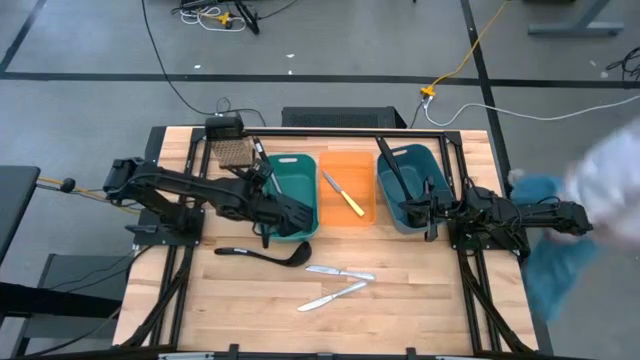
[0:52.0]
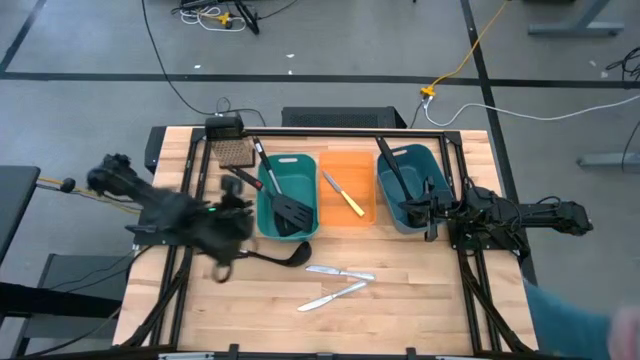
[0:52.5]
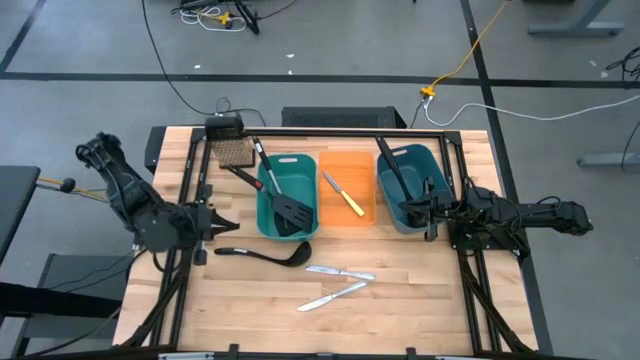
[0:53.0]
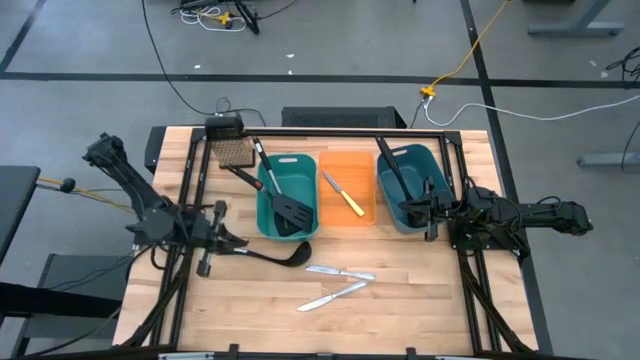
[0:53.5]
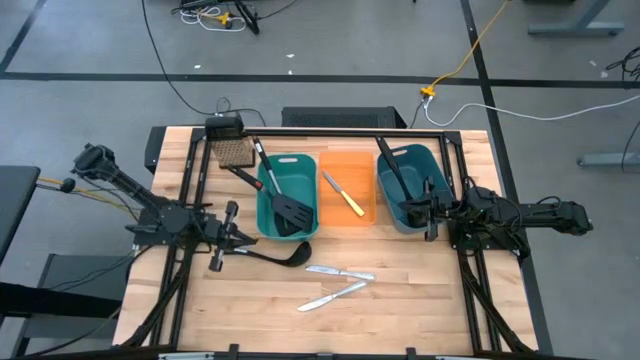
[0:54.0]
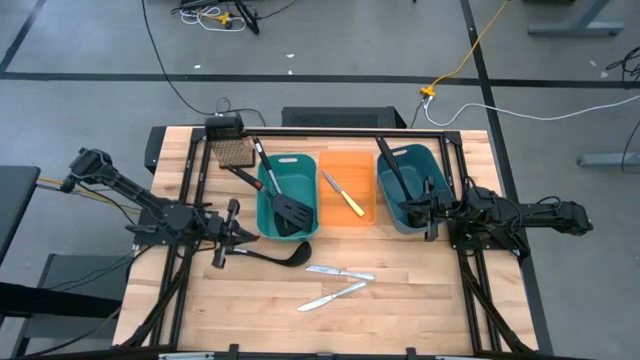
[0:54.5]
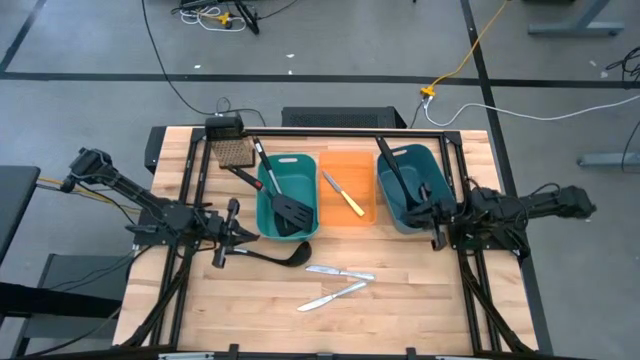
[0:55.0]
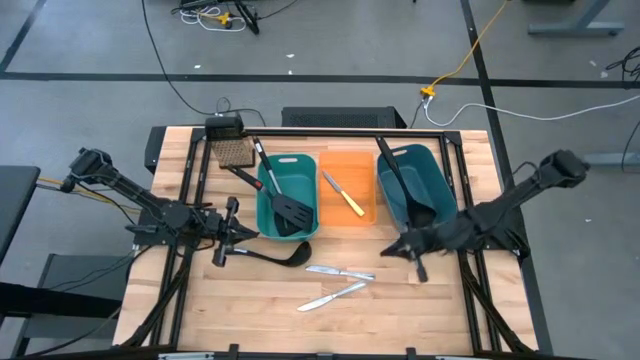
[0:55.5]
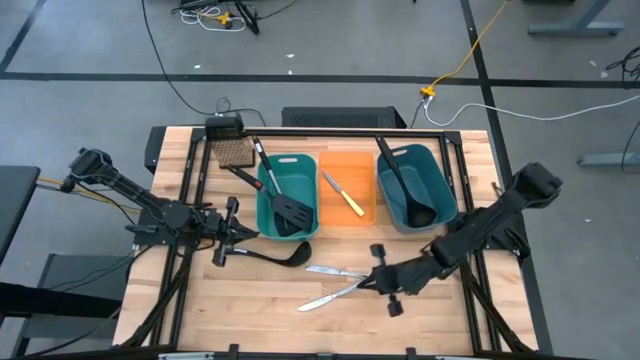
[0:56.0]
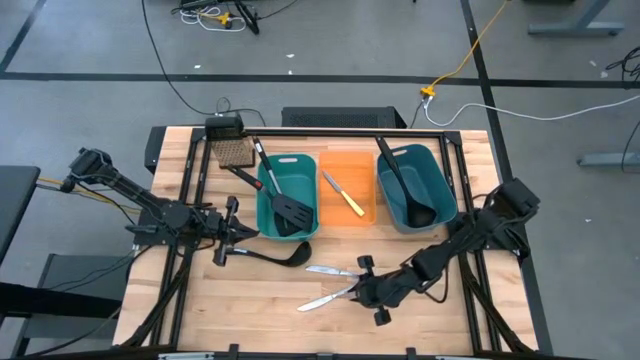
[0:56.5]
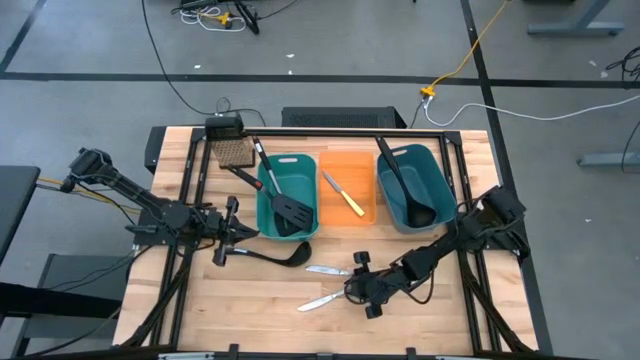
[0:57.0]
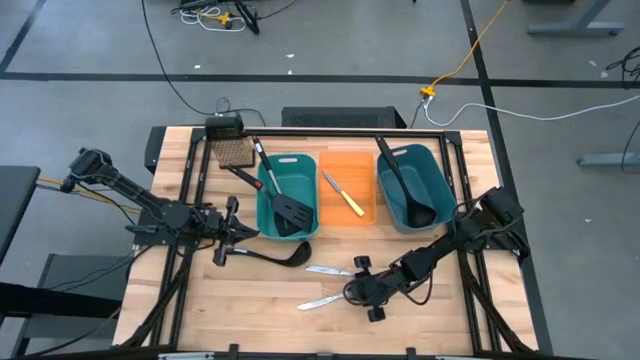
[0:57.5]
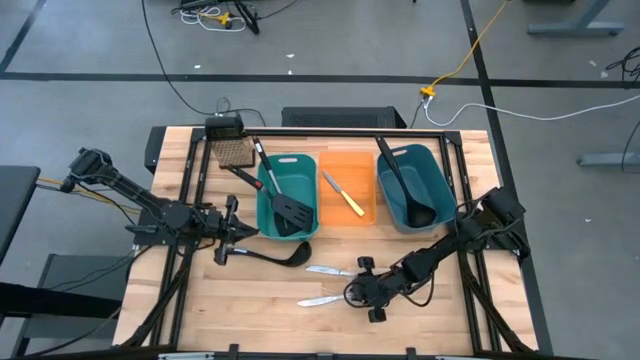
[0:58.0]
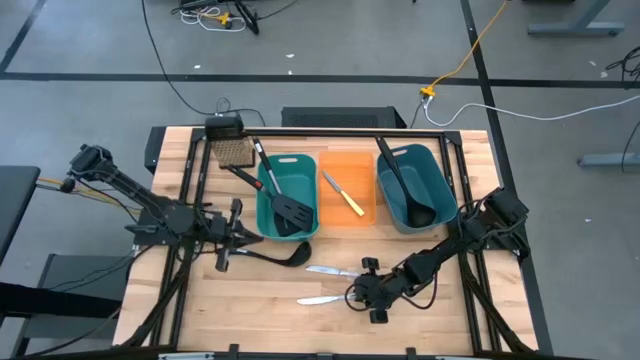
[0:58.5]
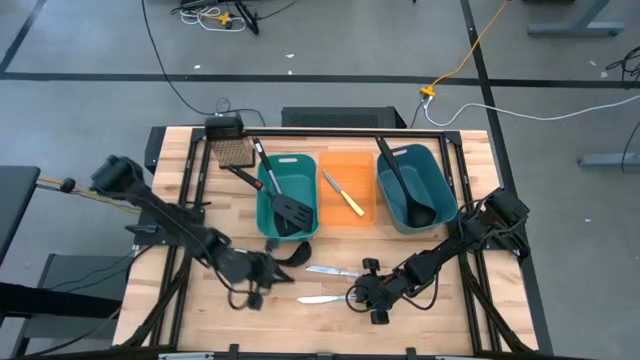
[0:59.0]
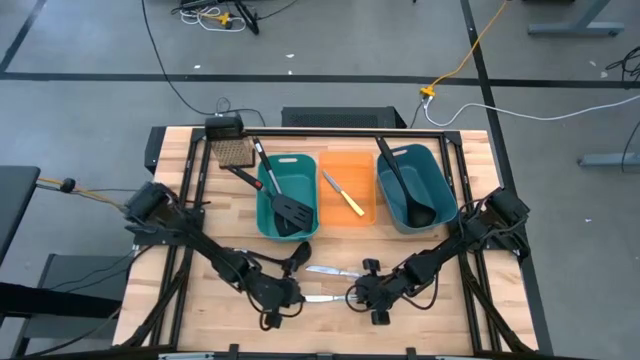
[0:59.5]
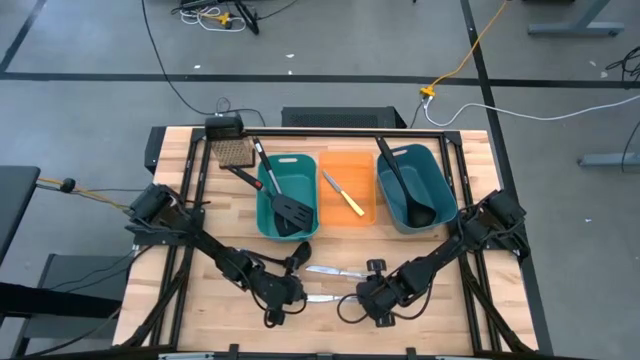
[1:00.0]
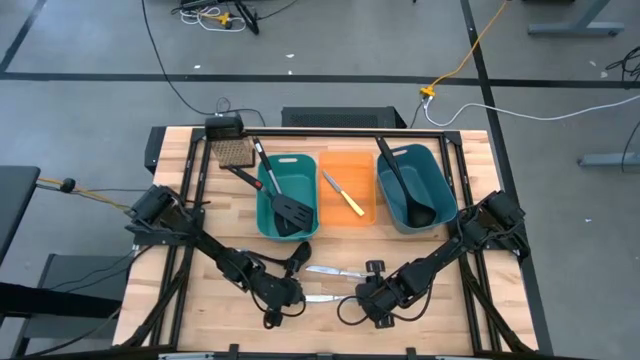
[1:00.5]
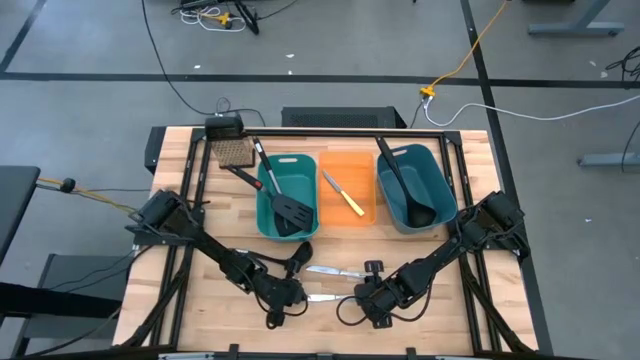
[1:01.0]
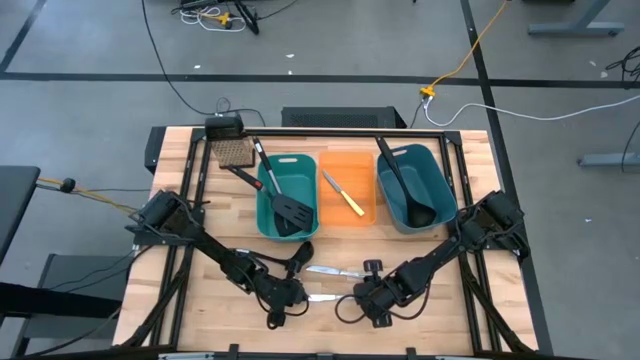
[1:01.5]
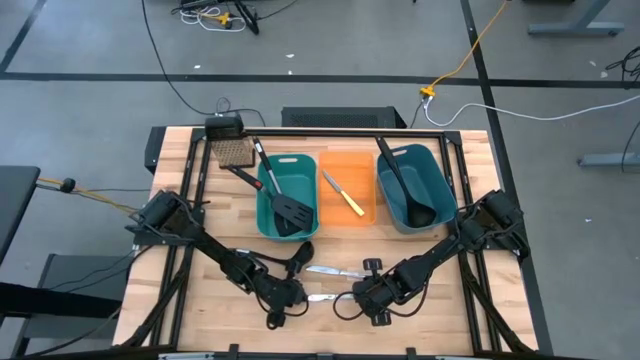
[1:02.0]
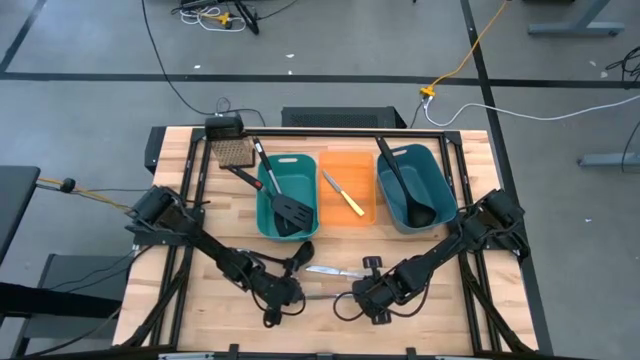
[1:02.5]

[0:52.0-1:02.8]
Task: Pick & Place Kitchen Items
Put the silver knife into the orange bin

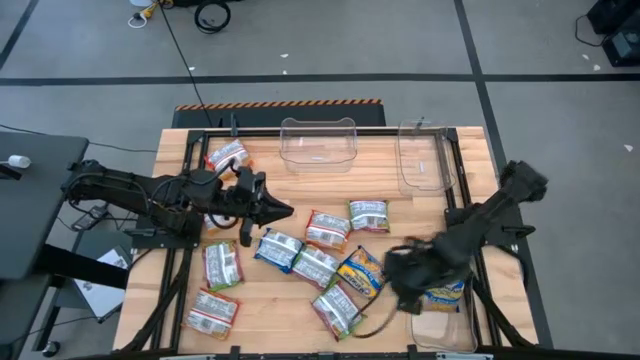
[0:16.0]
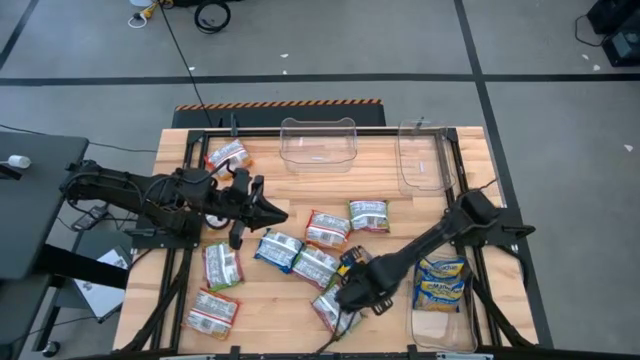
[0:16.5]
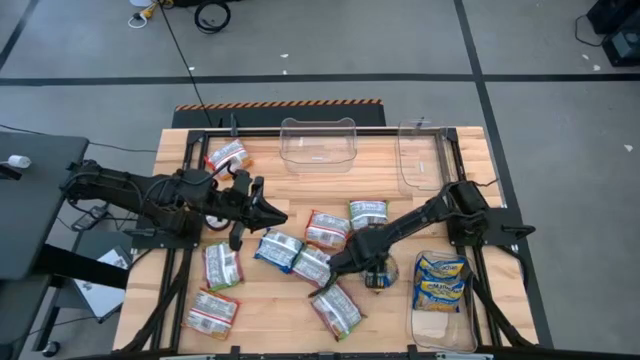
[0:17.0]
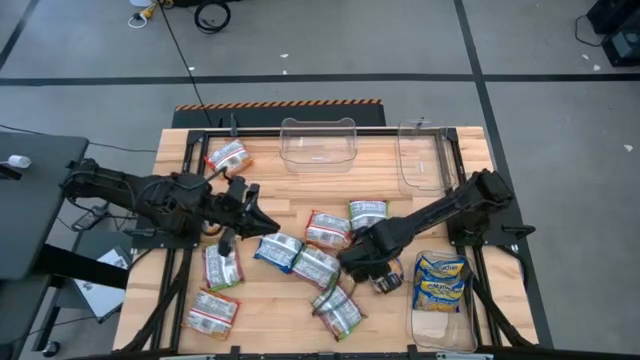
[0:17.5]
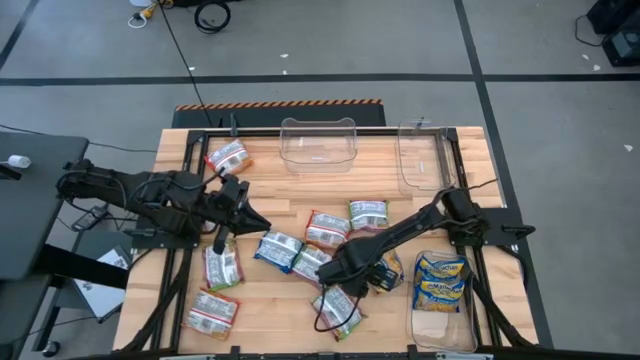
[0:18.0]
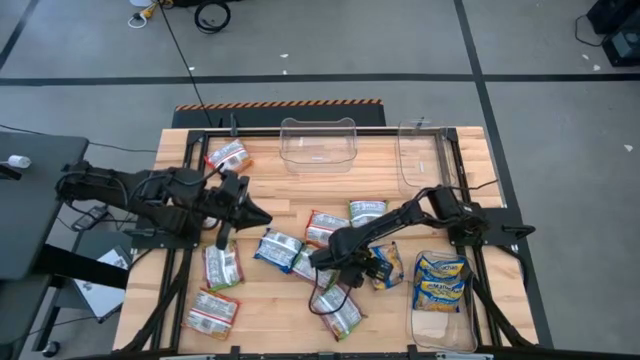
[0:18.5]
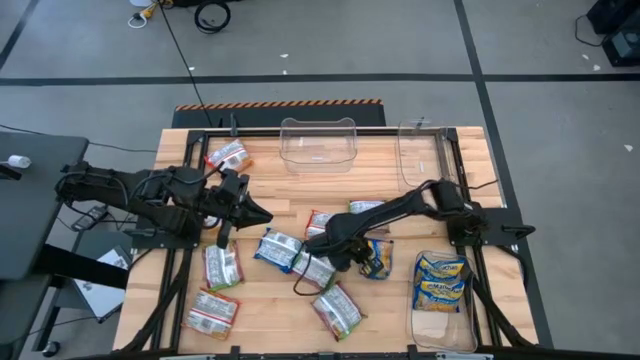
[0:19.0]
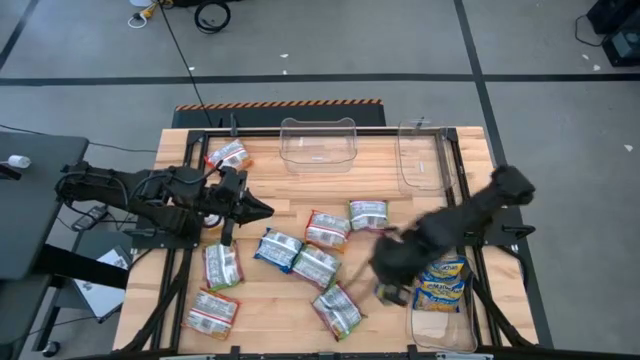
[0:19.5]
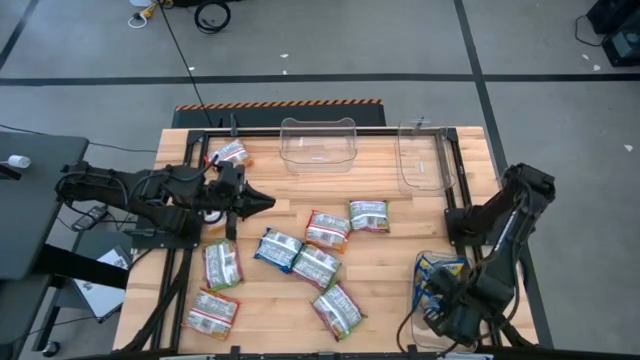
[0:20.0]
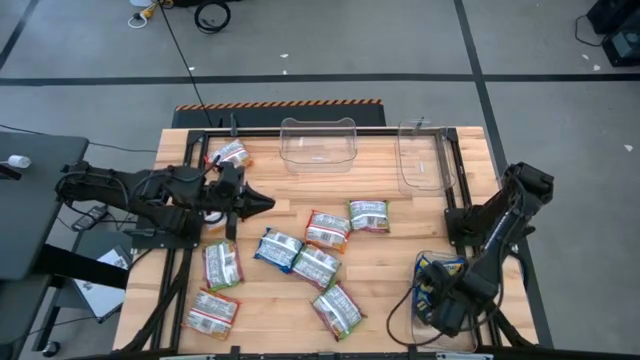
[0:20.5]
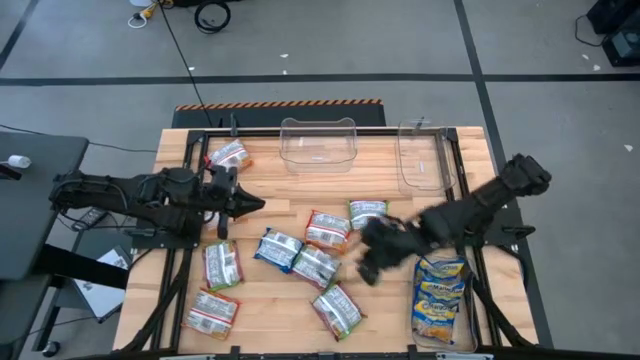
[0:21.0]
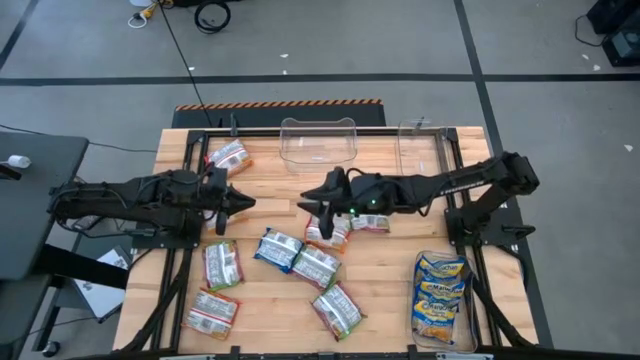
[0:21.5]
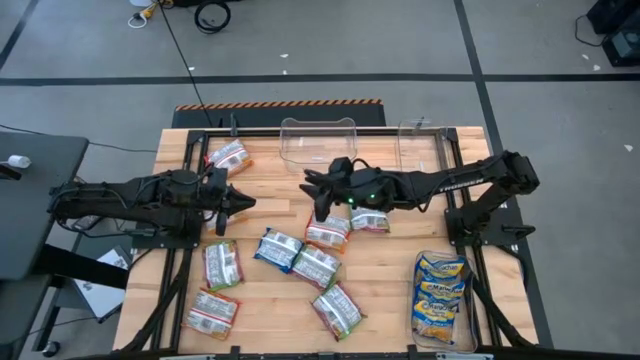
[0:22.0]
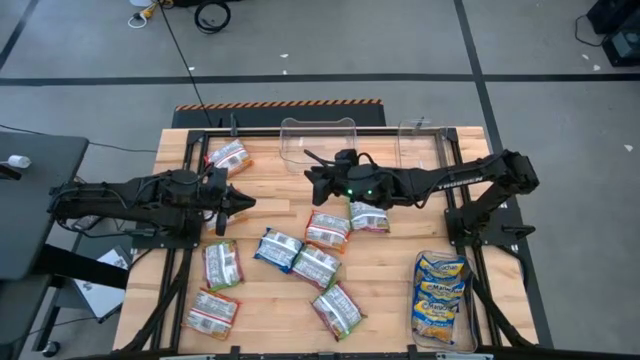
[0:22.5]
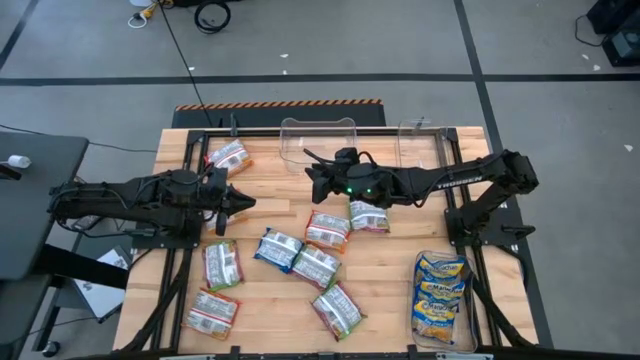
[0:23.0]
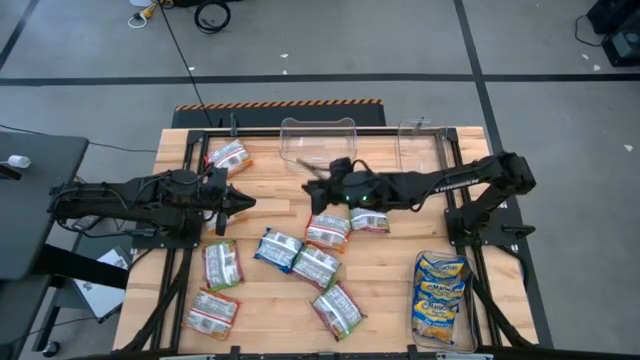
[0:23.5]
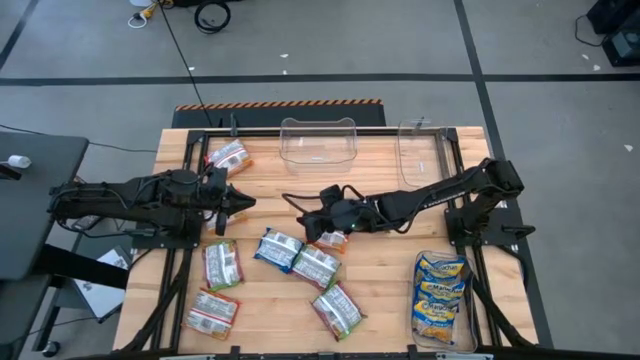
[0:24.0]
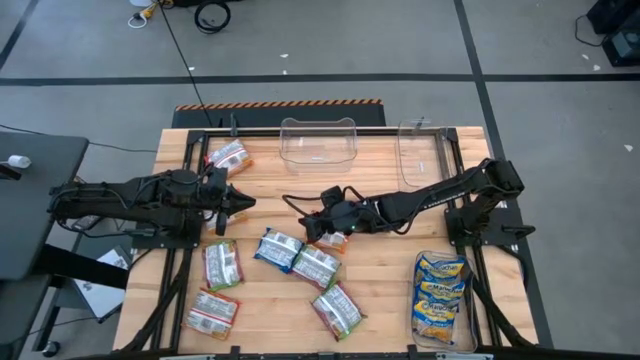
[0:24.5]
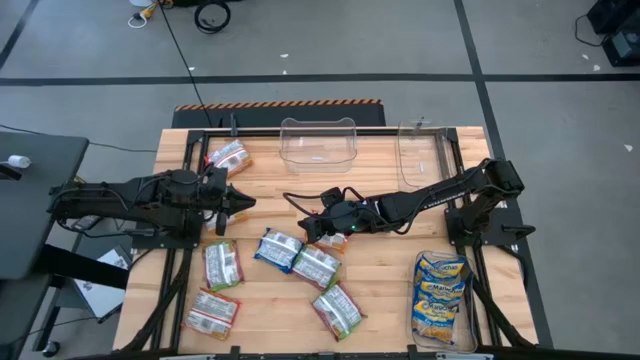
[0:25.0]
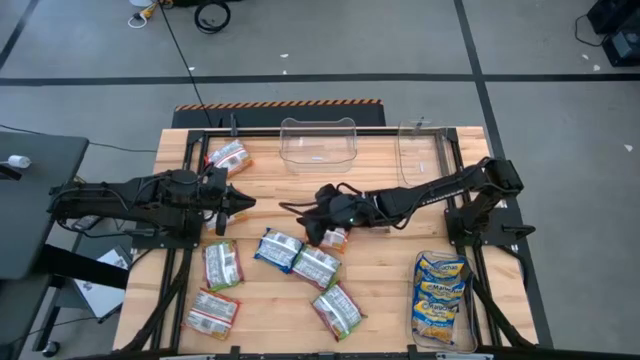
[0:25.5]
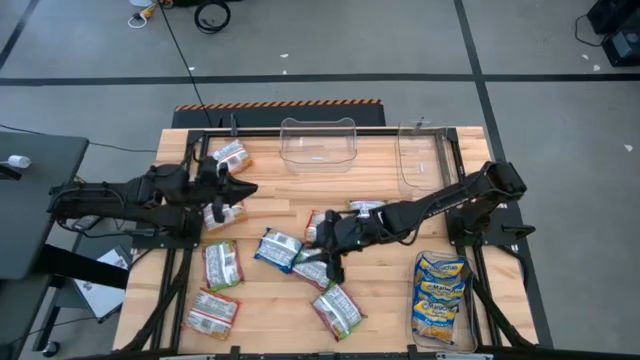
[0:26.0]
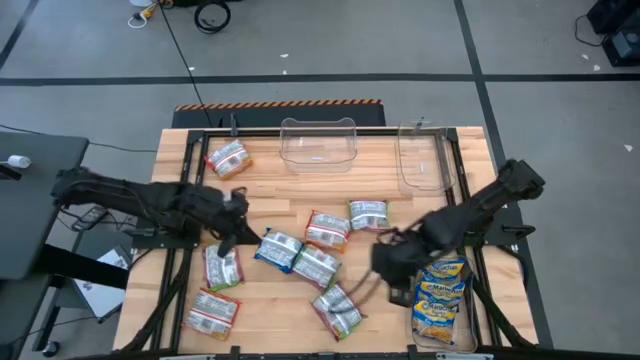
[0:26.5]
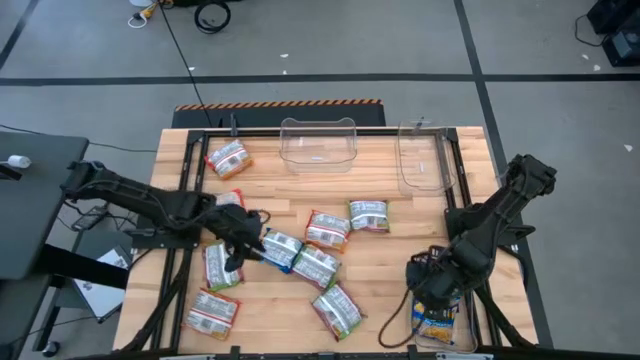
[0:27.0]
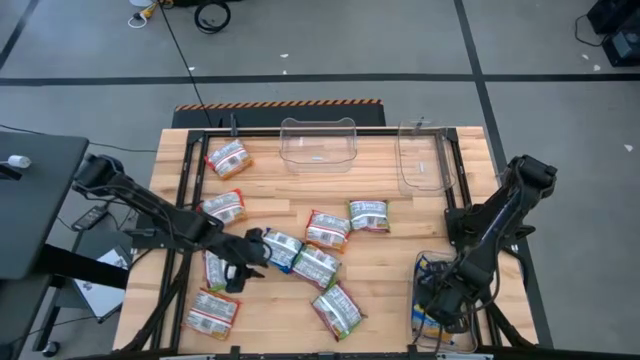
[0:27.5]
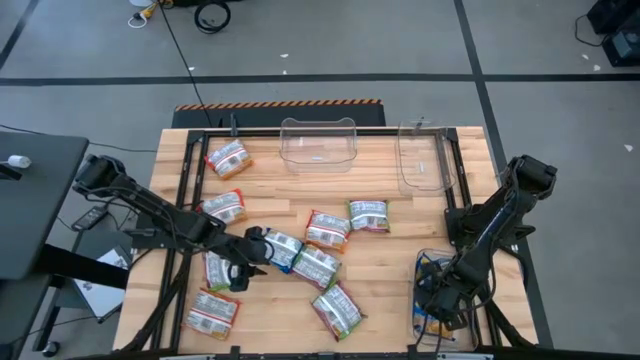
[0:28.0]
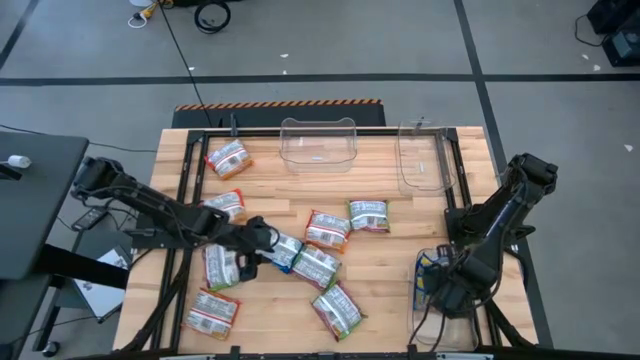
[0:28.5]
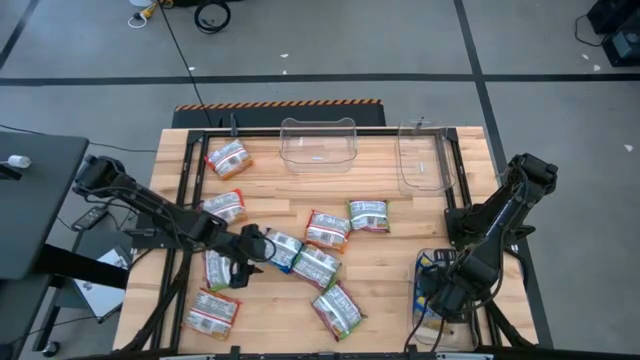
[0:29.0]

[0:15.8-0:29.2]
Task: Sort Maruchan noodles
Put the bottom right blue noodle pack into the bottom right transparent bin
